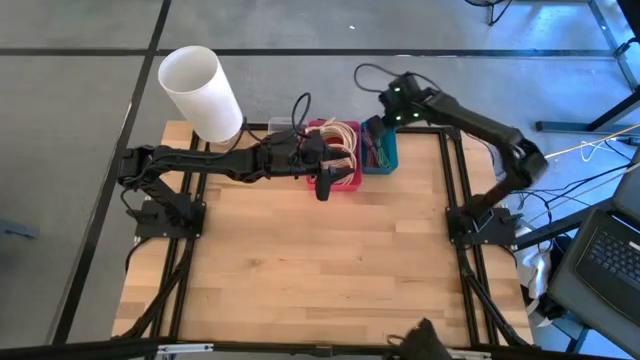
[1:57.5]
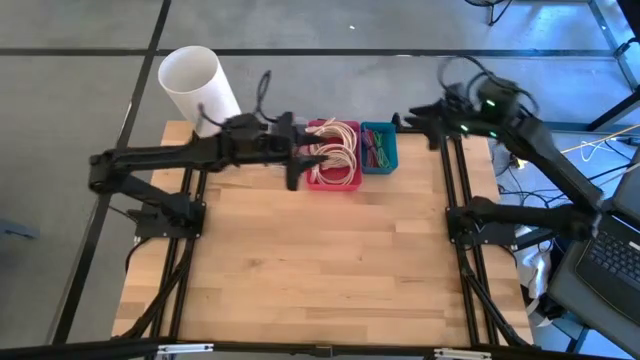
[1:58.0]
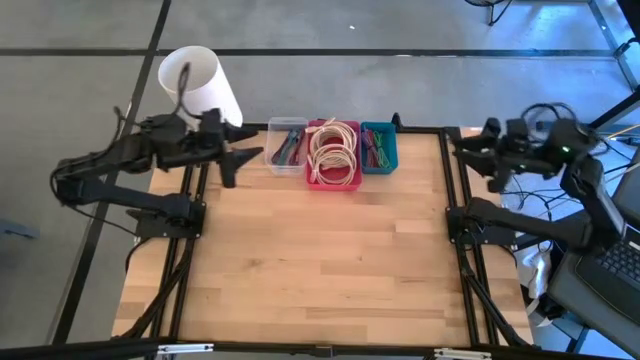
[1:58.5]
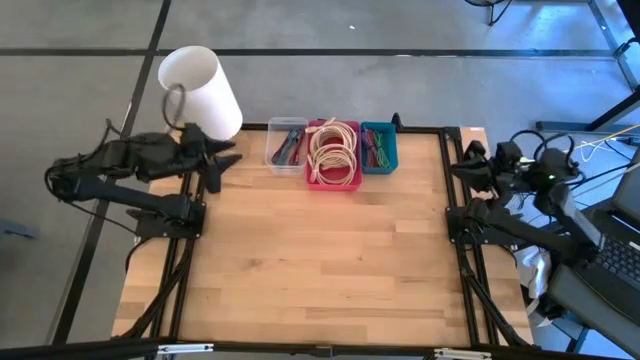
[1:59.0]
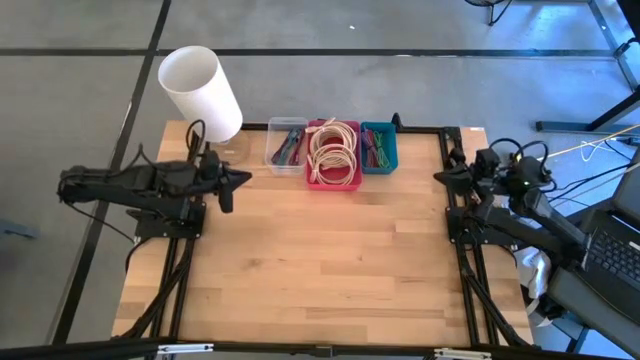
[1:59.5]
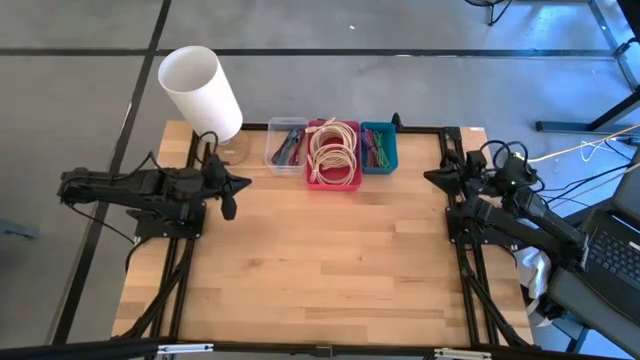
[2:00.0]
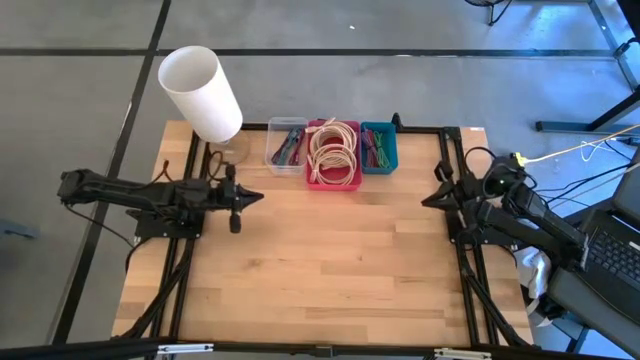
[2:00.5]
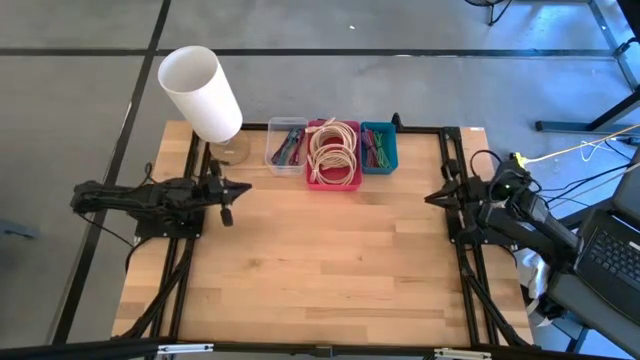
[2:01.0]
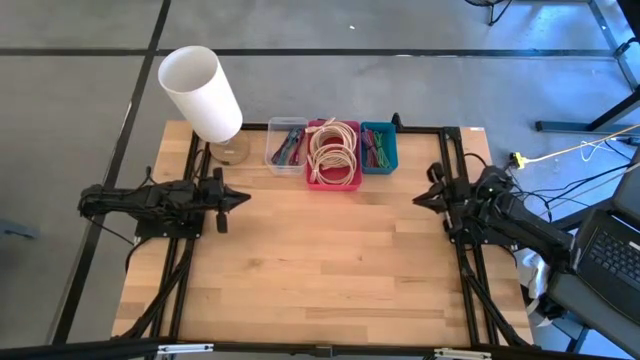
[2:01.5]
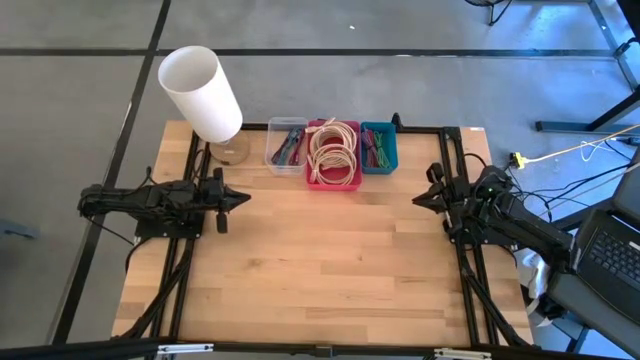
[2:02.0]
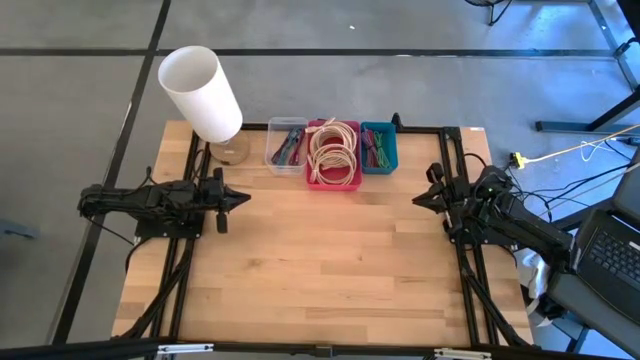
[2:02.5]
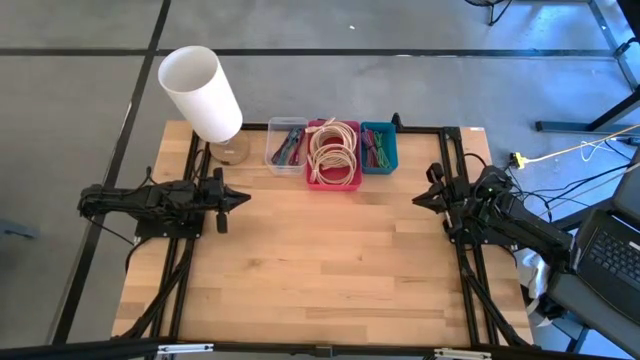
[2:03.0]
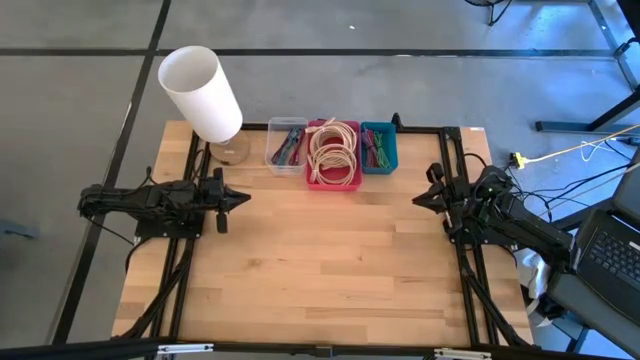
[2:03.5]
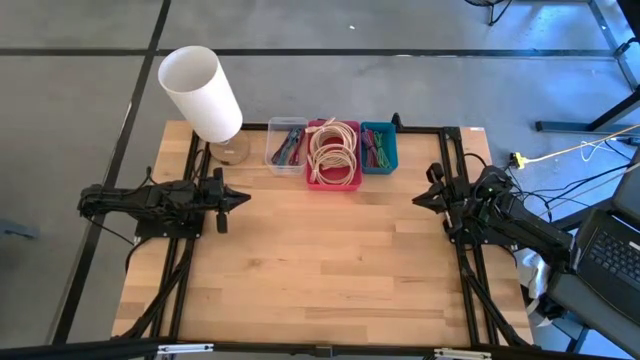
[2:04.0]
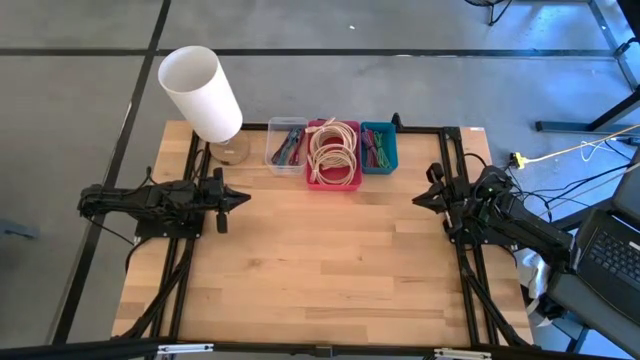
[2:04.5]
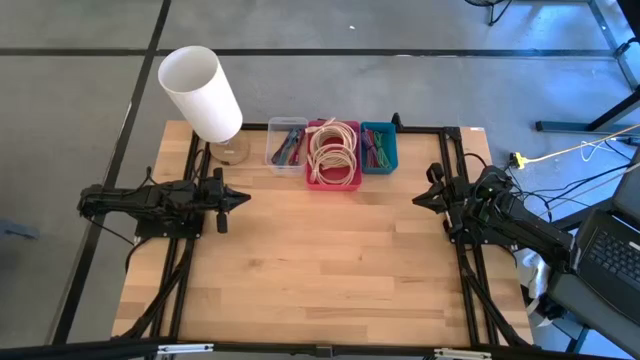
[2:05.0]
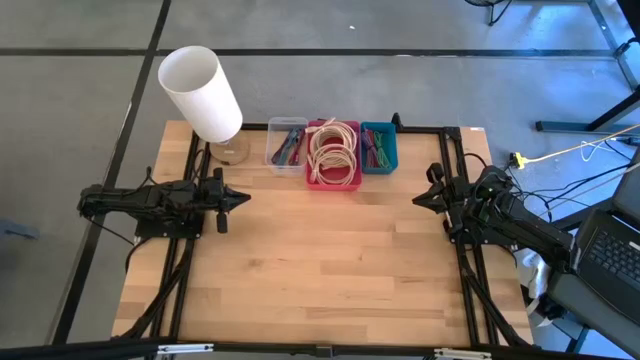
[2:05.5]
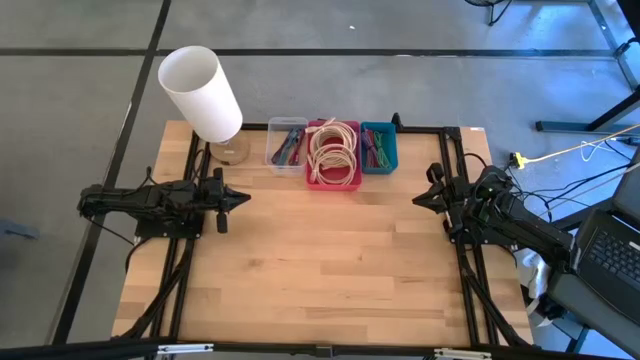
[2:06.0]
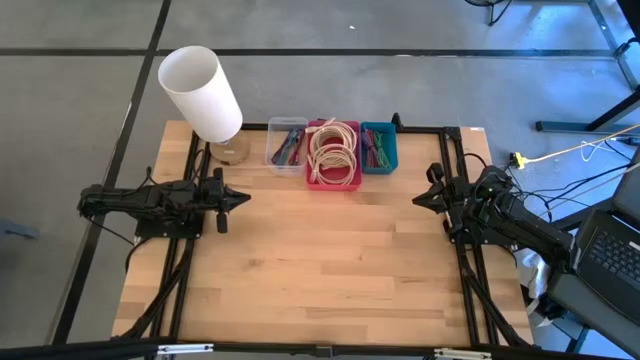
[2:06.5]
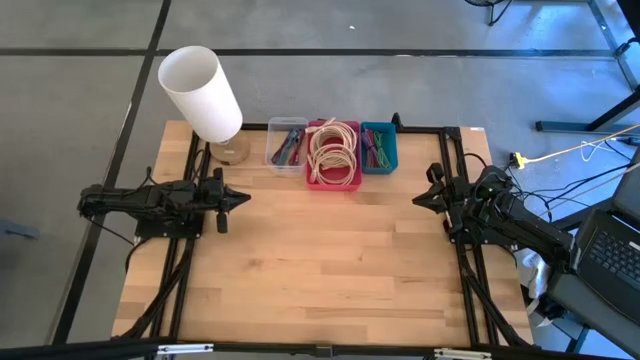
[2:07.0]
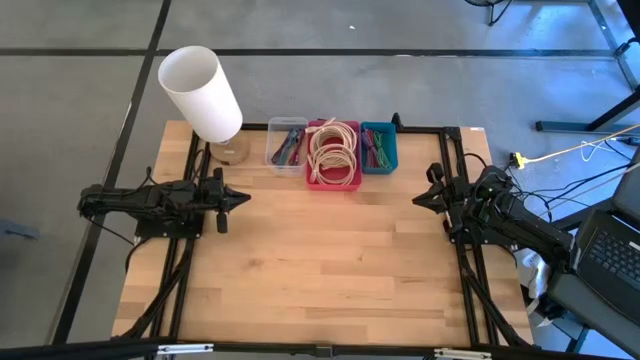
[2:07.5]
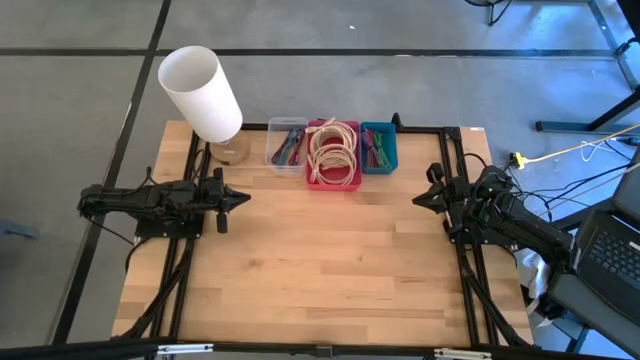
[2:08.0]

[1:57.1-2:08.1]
Task: Pick & Place USB Port
Return to Home Position

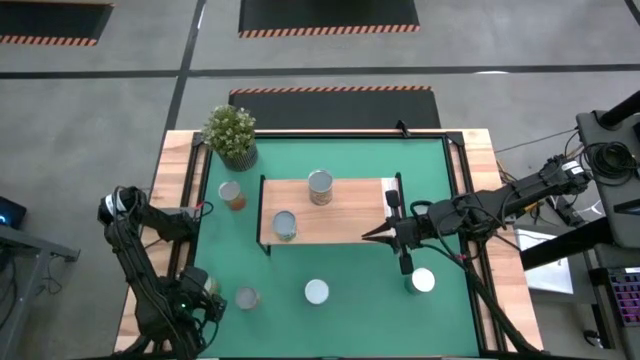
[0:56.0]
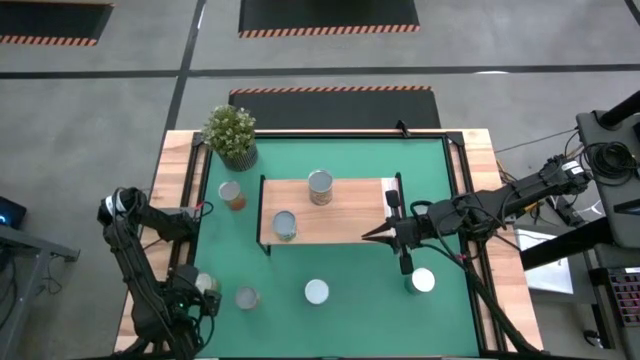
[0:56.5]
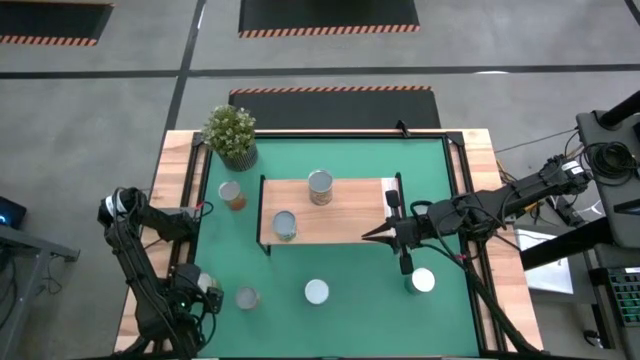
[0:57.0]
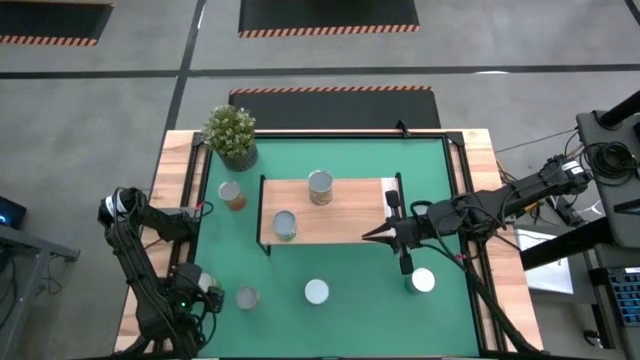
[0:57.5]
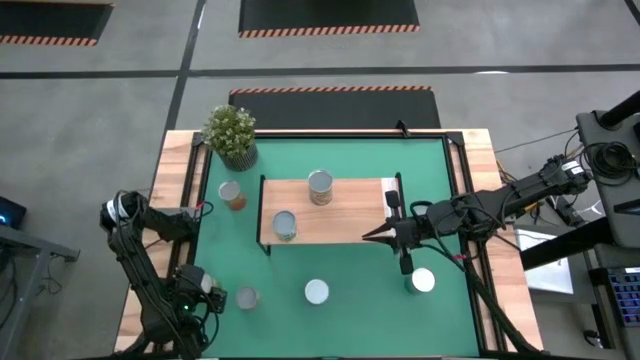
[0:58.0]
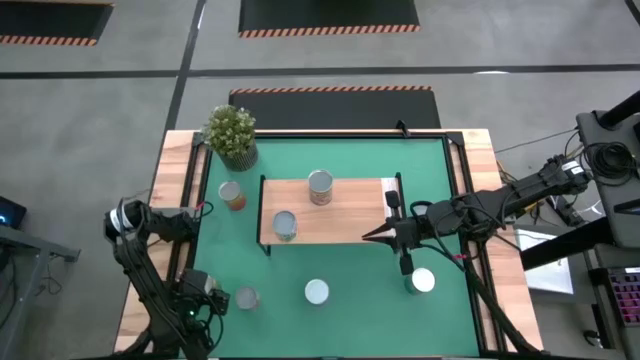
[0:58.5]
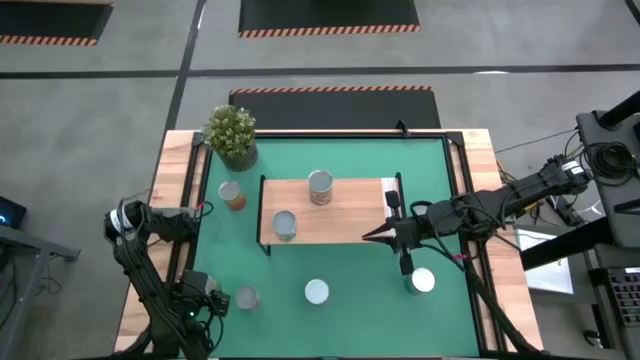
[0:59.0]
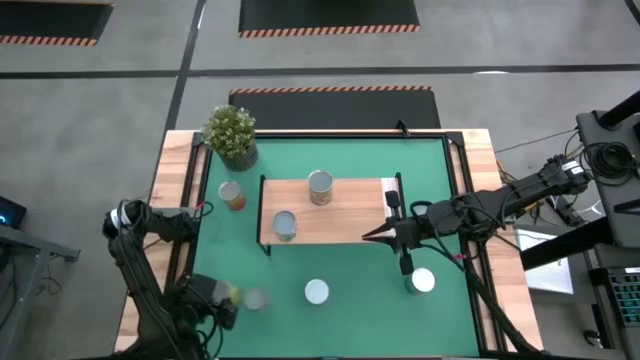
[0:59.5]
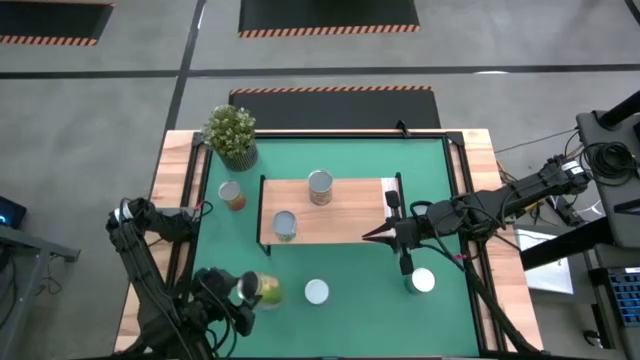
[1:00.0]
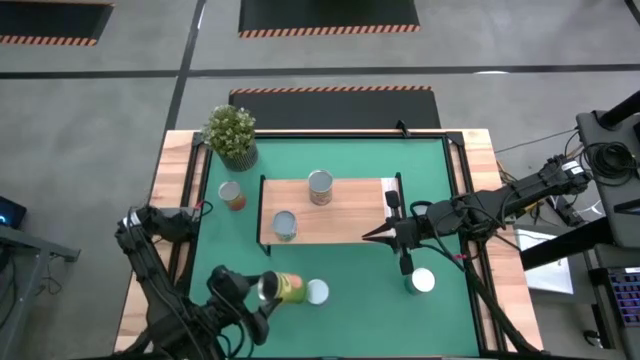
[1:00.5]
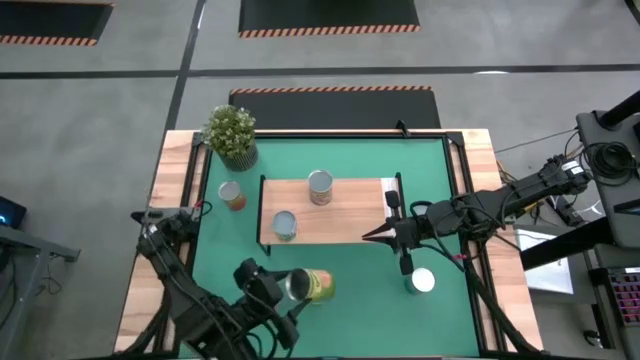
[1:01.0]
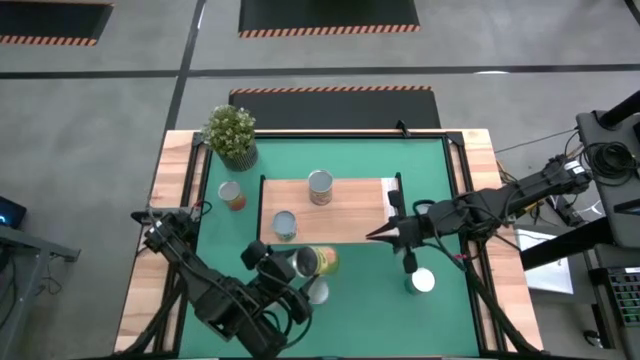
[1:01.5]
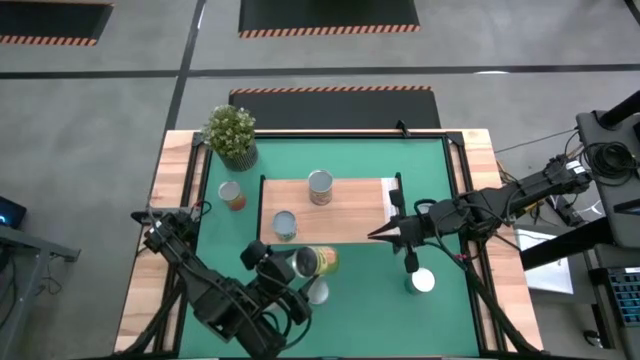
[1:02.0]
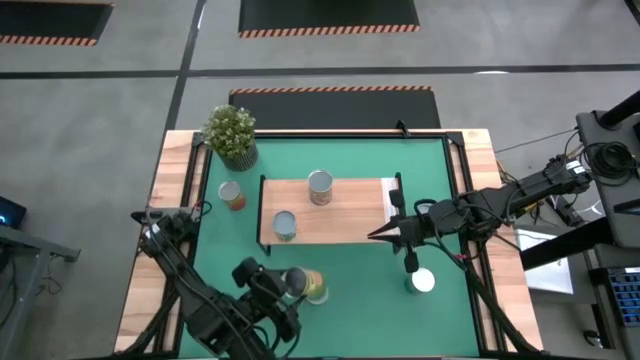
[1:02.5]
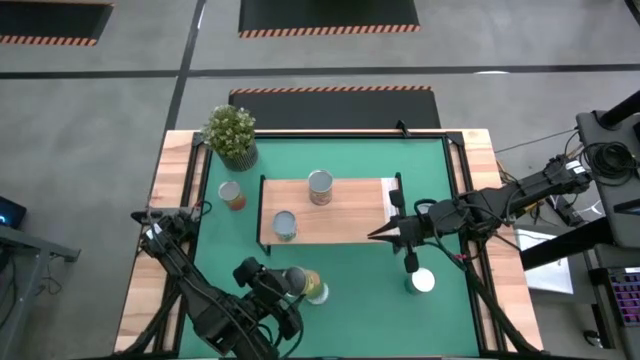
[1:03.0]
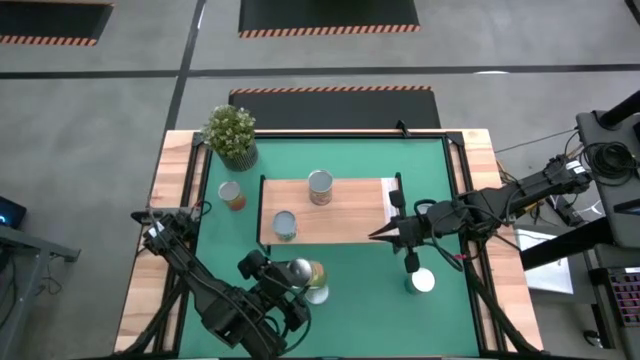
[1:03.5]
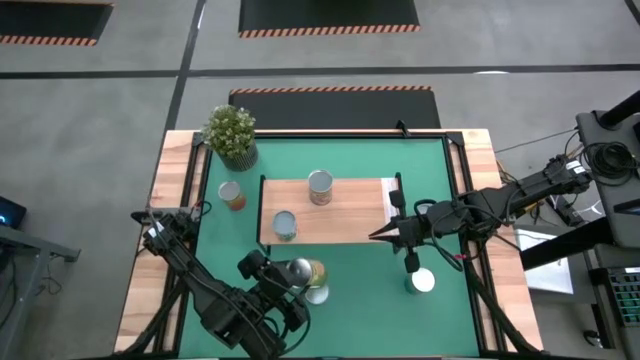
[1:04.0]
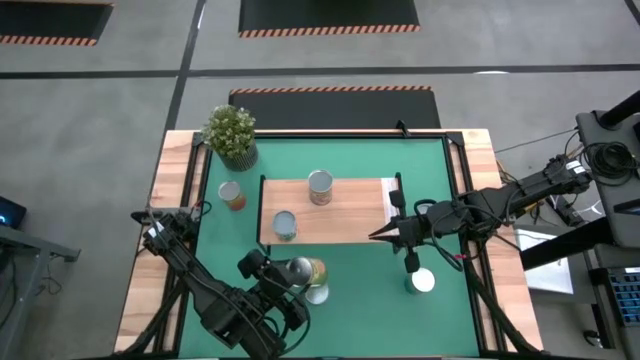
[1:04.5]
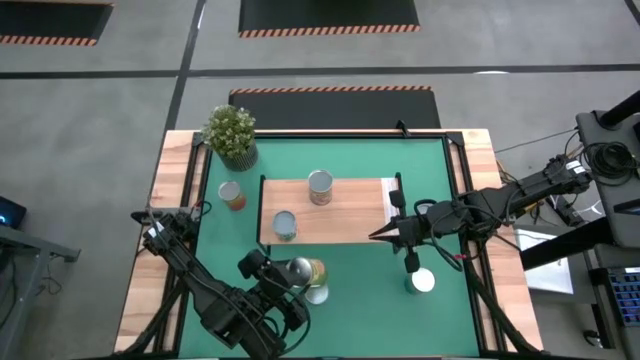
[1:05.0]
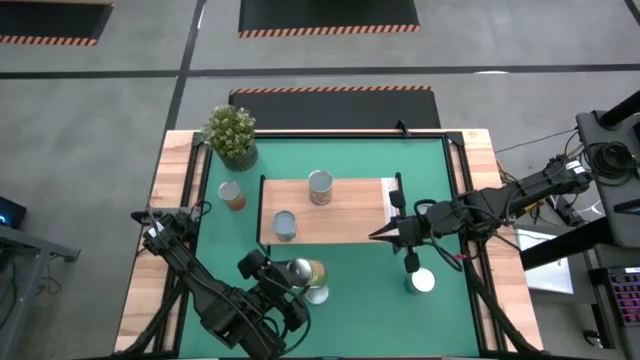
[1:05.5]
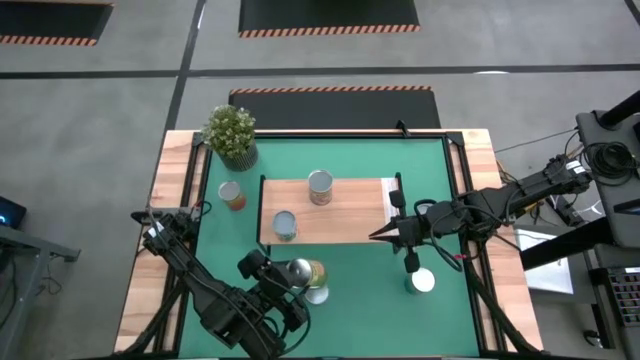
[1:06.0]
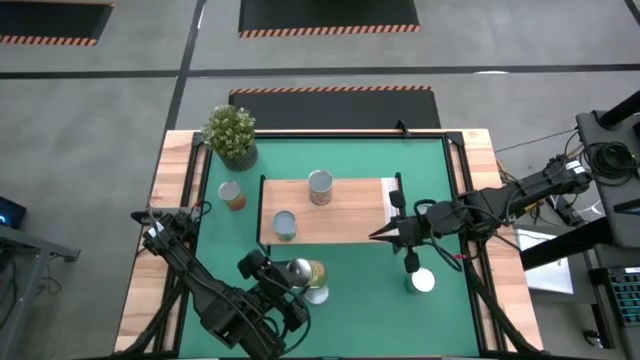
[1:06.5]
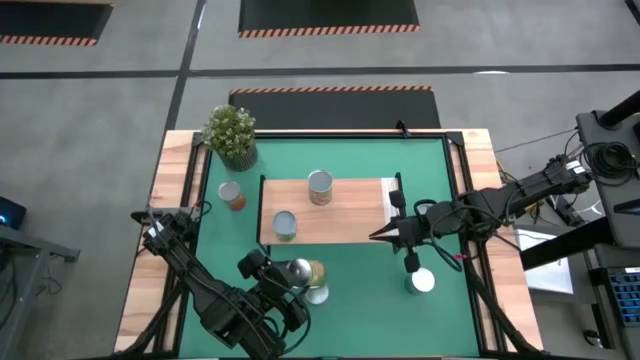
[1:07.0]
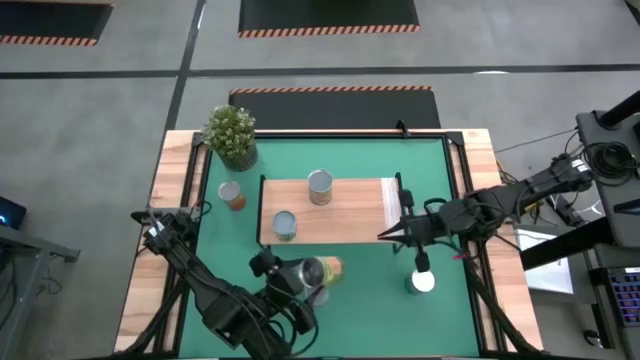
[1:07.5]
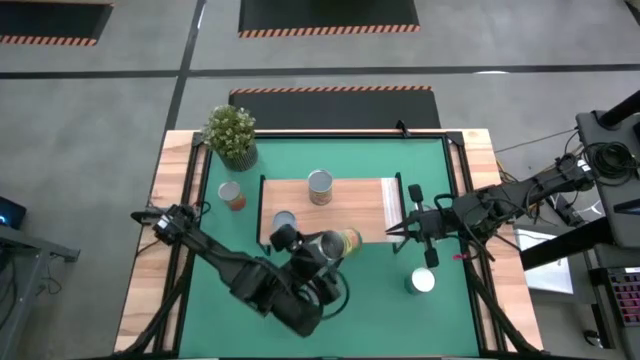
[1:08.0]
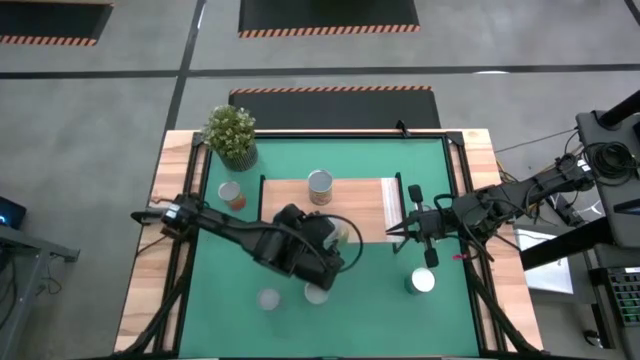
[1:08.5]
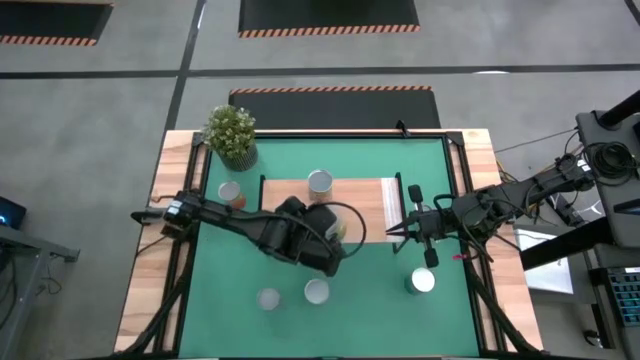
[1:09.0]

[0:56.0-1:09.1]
Task: Pick and place cans onto a shelf
Put the canned of oranges on the shelf
